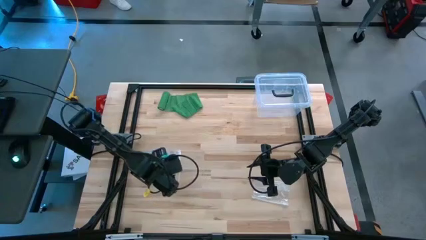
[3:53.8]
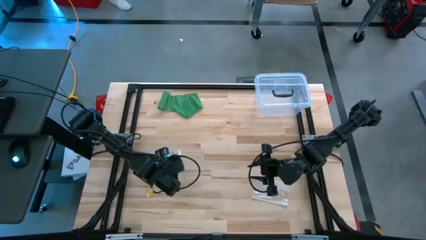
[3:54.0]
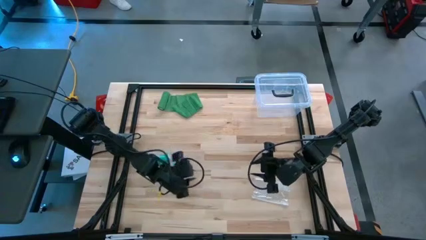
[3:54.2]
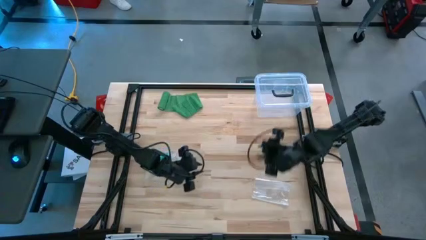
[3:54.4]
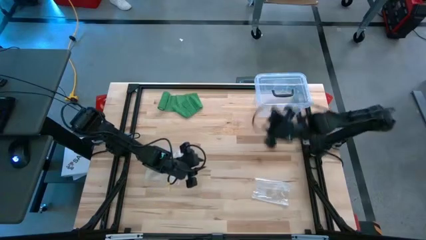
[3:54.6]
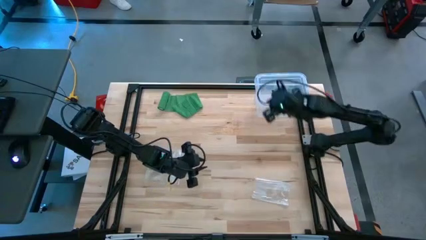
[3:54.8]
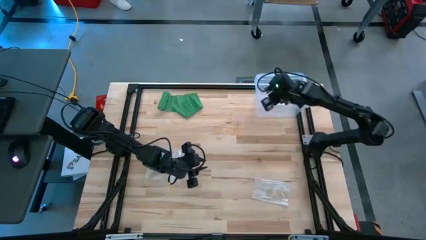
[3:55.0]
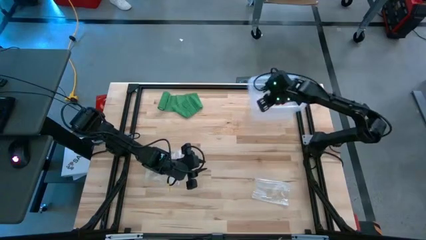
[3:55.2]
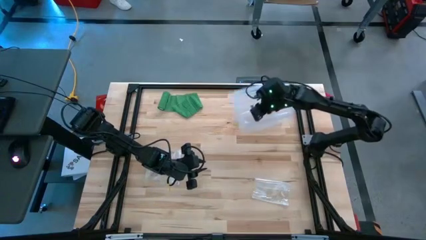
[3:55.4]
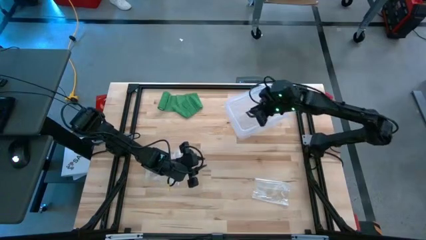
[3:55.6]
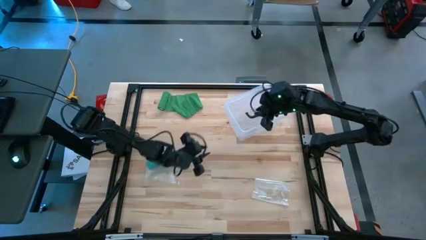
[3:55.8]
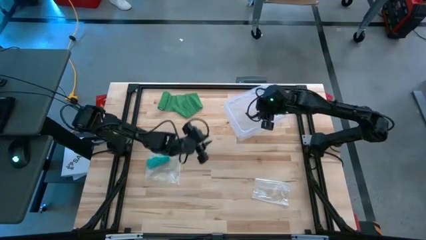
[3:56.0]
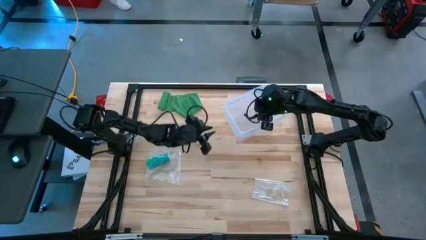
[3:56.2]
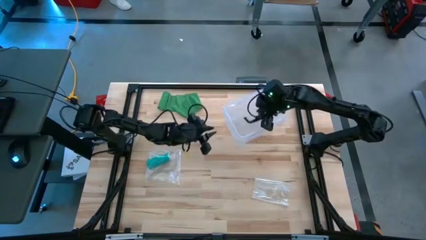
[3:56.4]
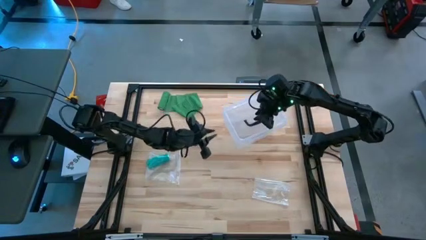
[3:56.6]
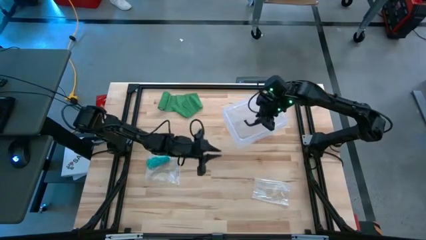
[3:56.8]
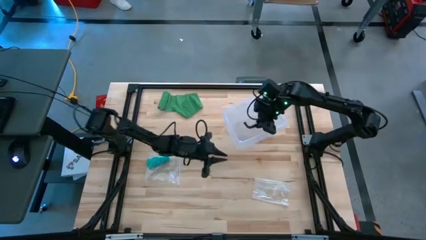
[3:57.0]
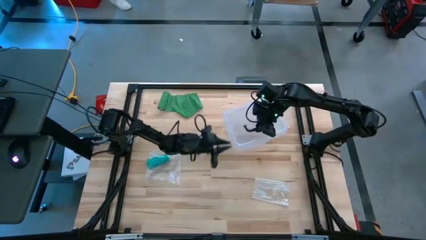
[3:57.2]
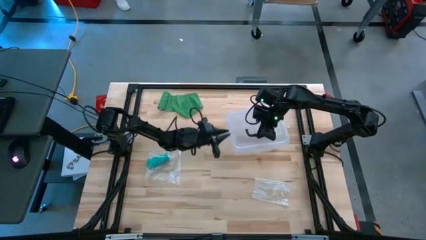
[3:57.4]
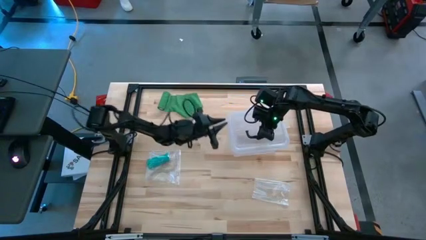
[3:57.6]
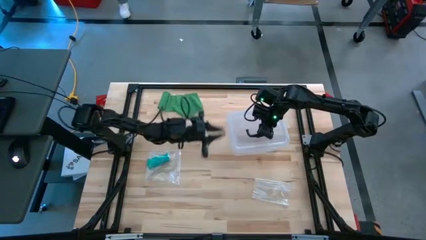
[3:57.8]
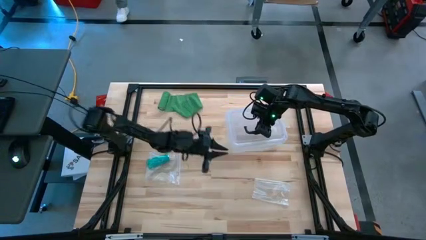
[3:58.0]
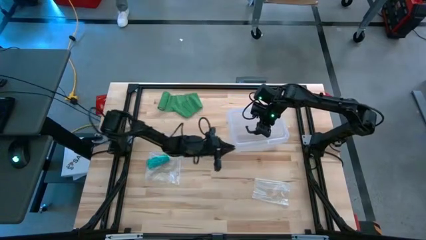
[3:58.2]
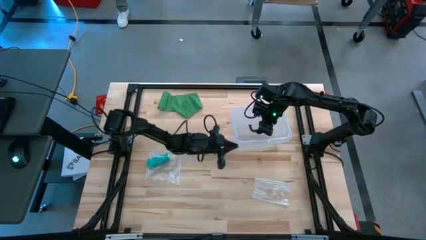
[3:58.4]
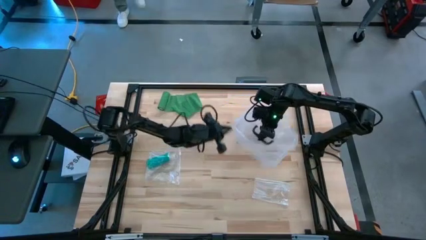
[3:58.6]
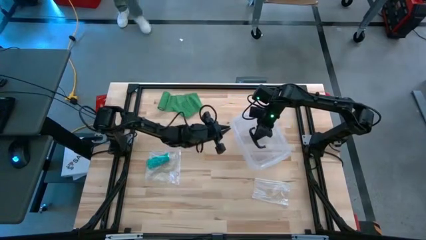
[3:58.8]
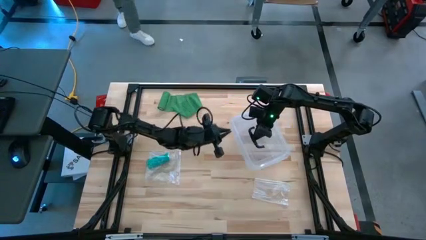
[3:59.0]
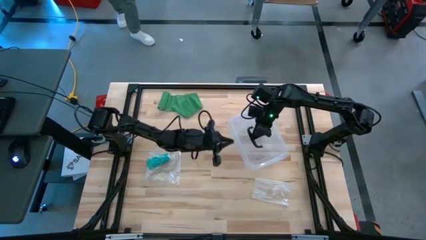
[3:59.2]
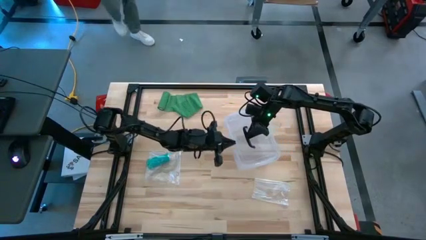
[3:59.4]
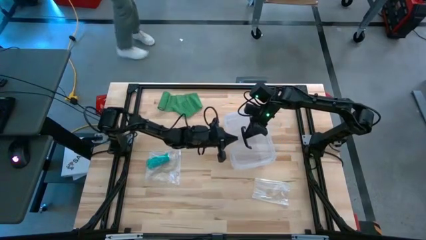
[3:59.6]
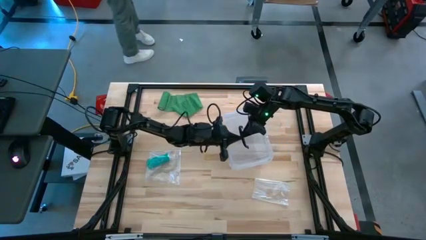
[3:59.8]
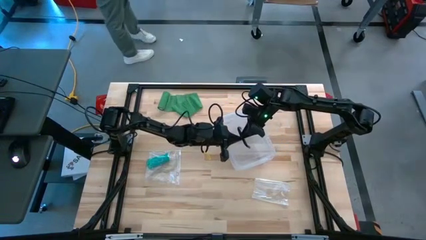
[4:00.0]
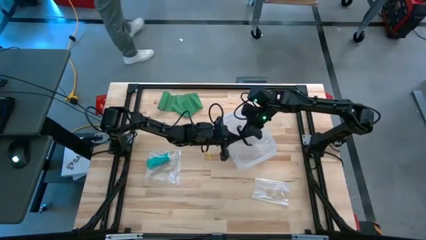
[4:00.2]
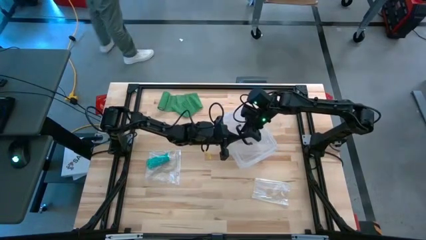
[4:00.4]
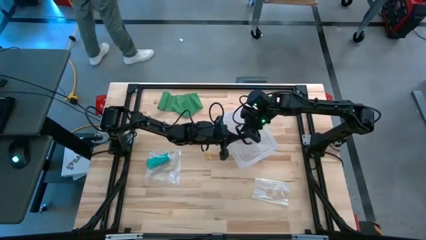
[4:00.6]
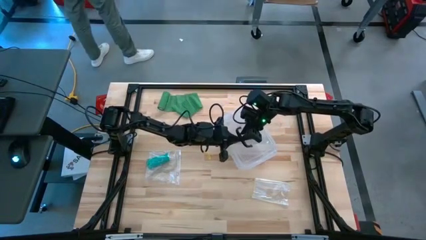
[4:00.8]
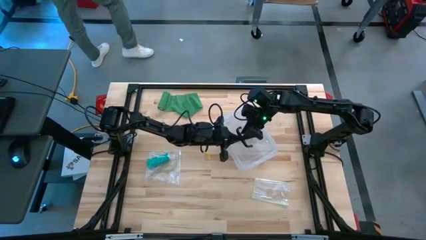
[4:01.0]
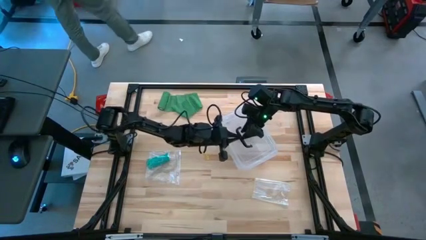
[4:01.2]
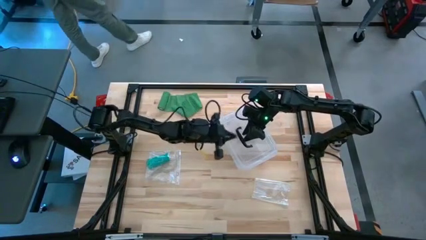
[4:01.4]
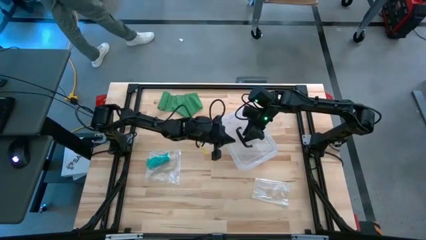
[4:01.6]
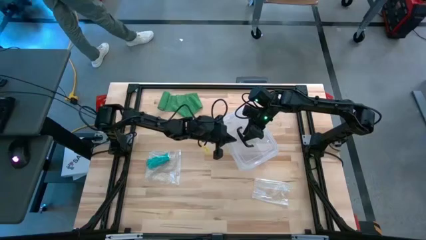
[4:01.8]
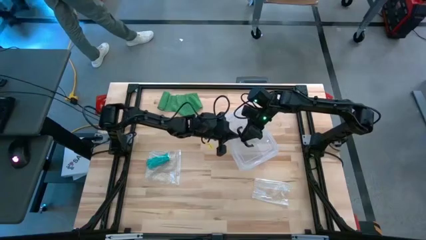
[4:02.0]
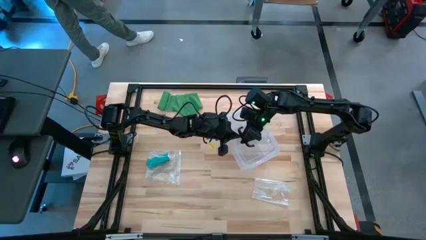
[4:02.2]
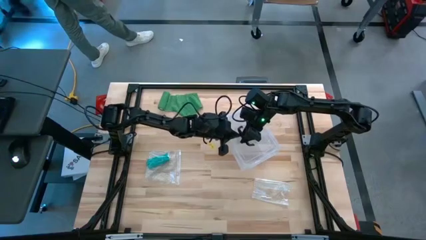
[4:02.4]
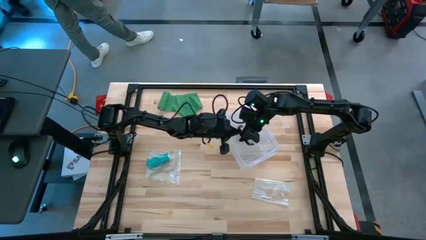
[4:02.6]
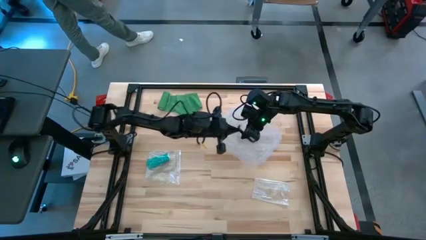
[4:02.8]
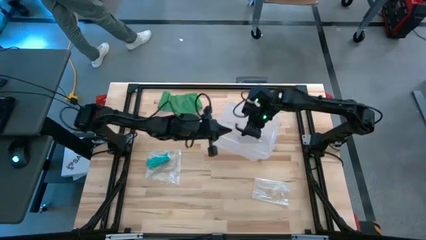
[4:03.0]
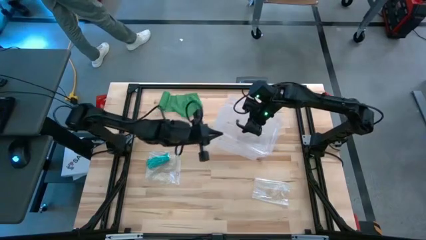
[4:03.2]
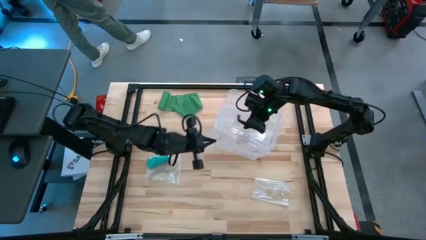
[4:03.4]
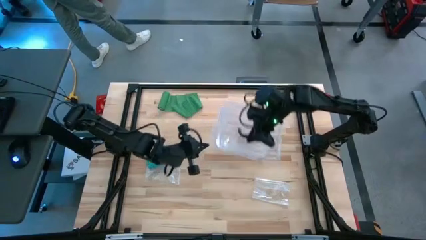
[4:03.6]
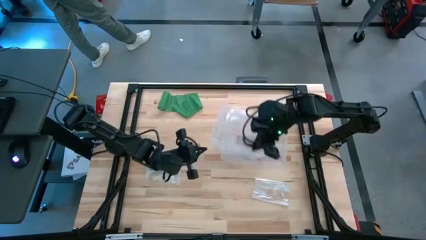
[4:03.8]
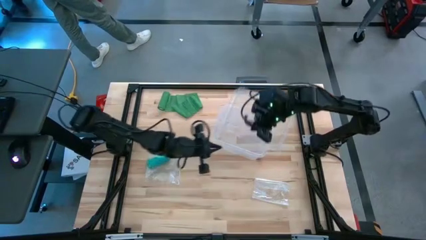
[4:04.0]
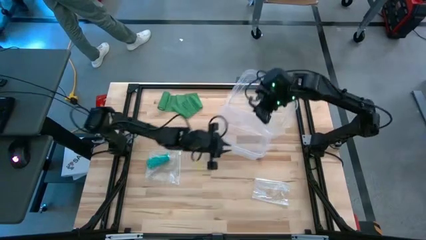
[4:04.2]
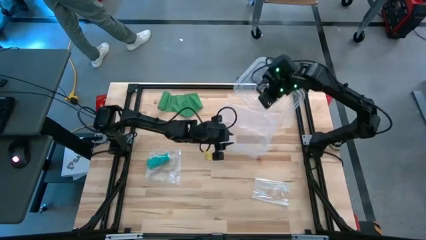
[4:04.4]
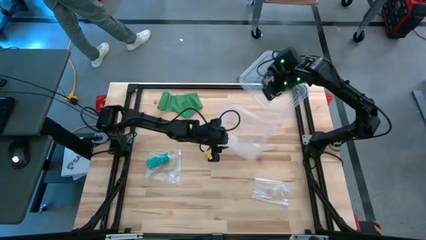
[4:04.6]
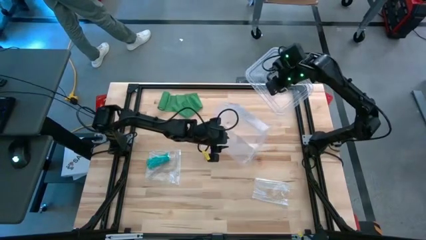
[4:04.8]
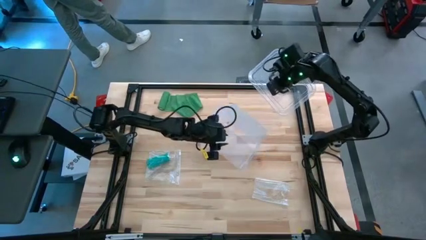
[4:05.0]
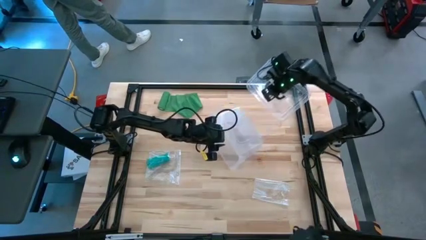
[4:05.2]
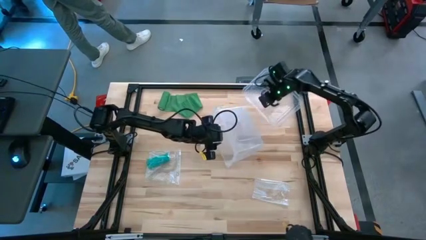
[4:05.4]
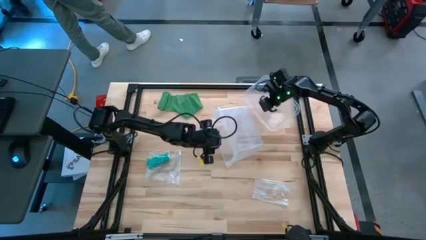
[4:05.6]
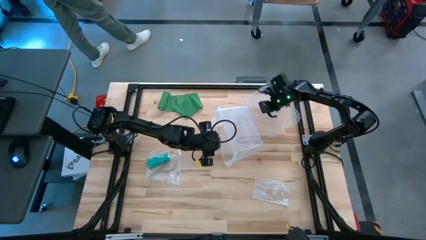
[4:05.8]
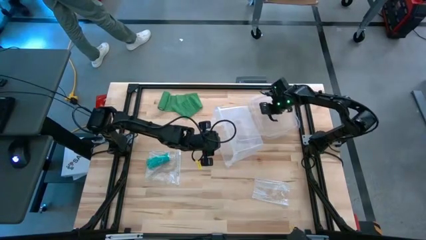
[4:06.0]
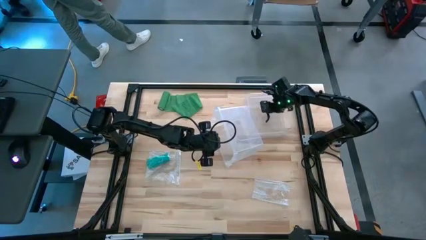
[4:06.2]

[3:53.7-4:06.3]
Task: Roll bandage
Open the transparent bin

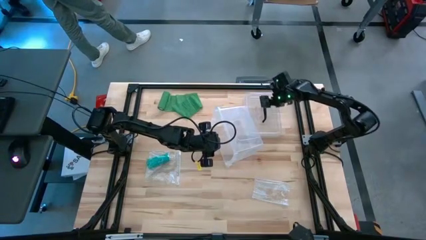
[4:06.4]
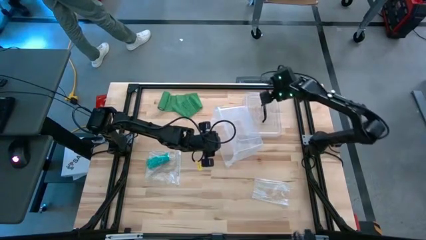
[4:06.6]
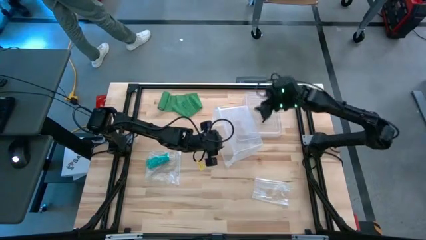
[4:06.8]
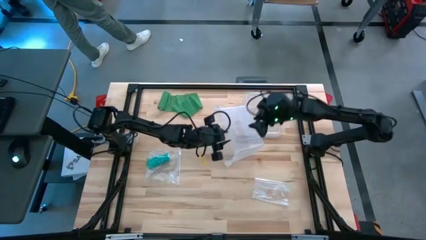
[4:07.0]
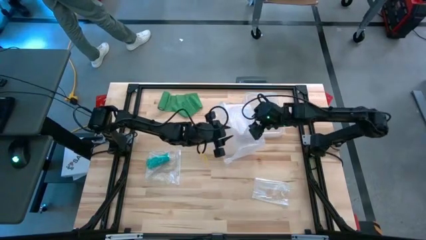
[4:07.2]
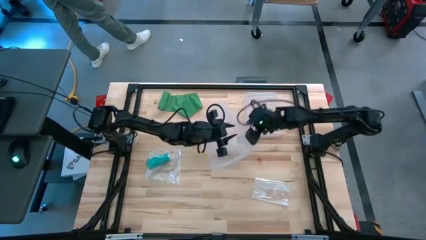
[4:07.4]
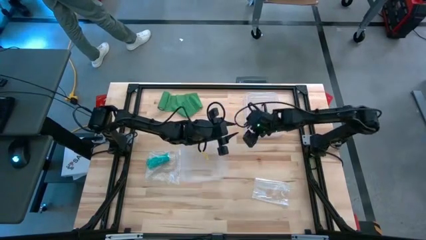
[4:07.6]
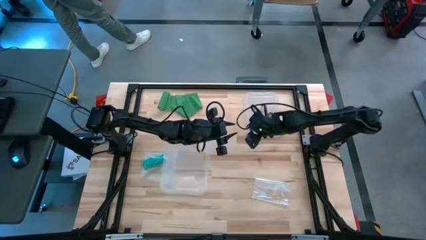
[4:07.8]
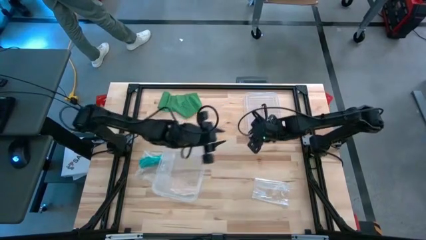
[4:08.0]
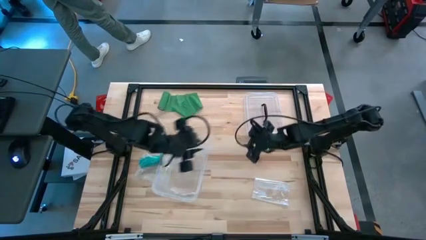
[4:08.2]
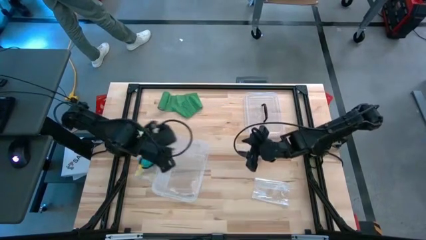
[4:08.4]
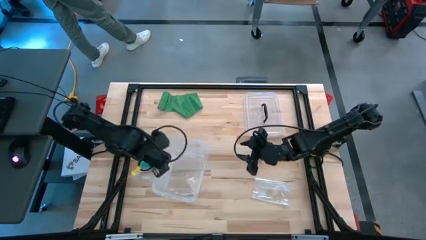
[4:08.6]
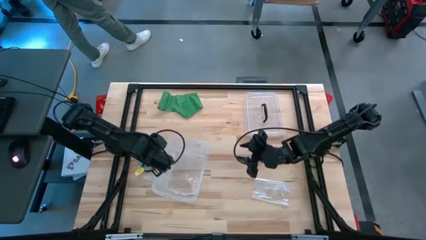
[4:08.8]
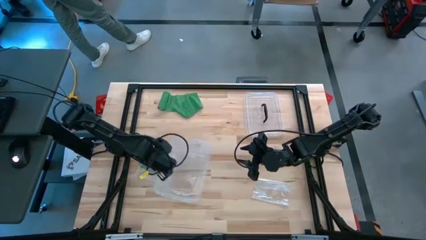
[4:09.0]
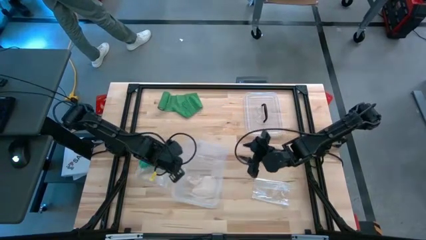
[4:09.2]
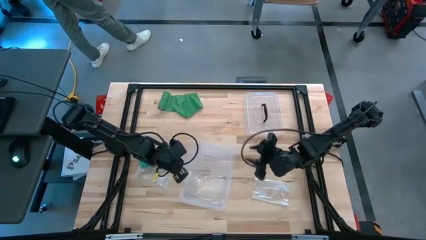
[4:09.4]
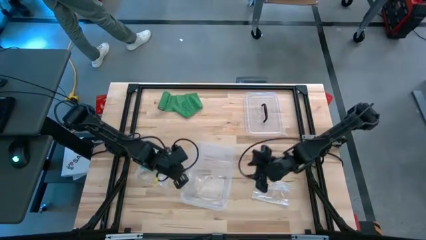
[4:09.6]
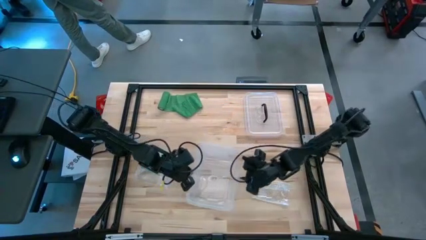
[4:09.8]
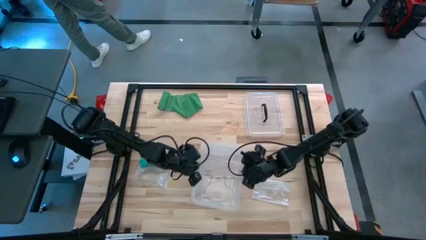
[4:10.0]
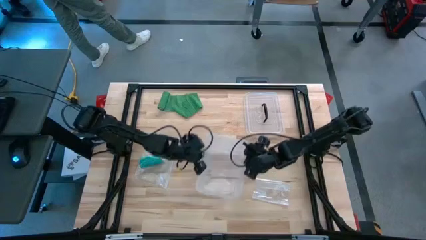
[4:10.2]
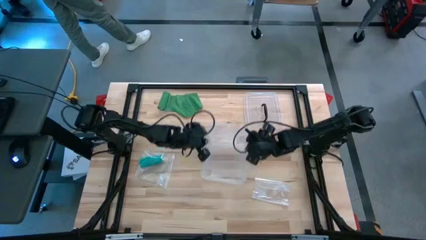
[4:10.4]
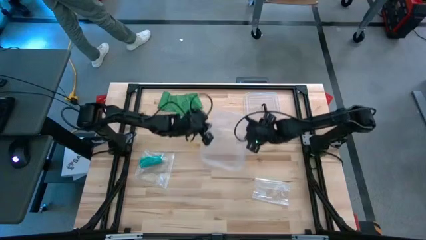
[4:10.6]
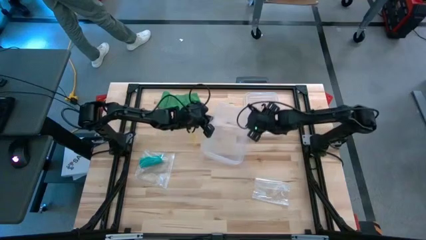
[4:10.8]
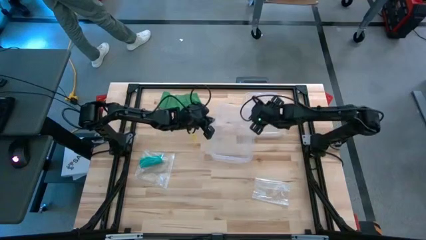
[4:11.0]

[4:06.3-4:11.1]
Move the transparent bin to the center of the table
